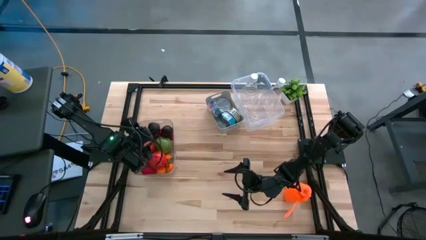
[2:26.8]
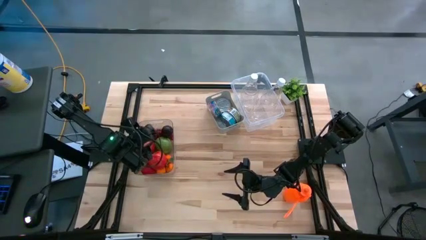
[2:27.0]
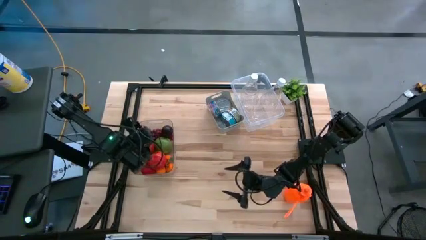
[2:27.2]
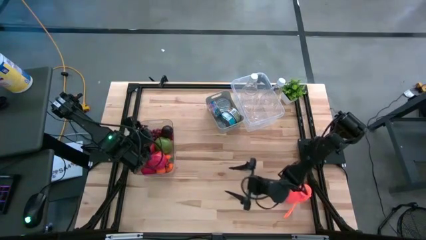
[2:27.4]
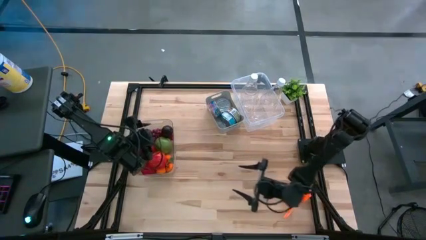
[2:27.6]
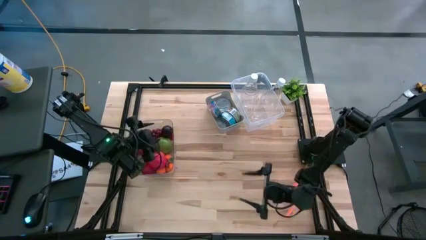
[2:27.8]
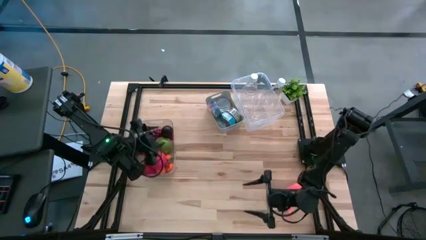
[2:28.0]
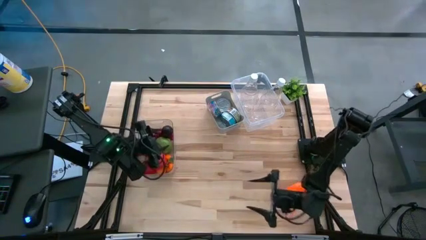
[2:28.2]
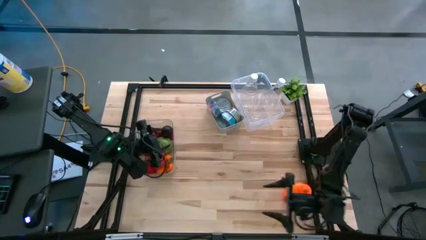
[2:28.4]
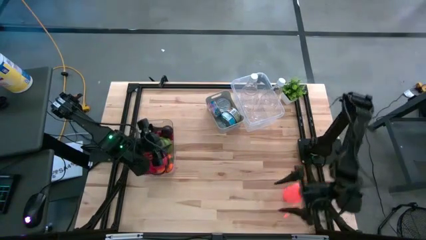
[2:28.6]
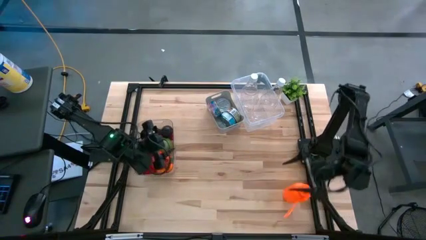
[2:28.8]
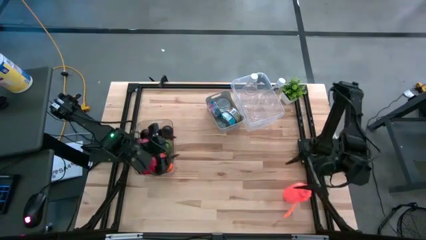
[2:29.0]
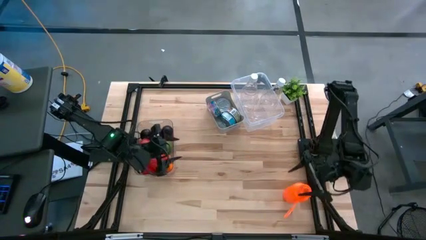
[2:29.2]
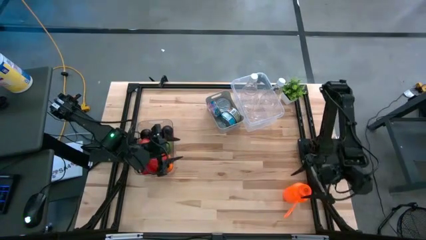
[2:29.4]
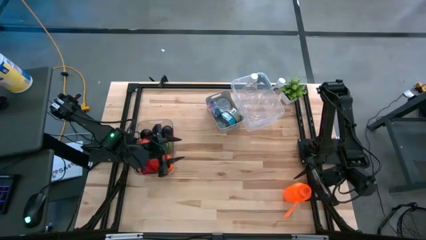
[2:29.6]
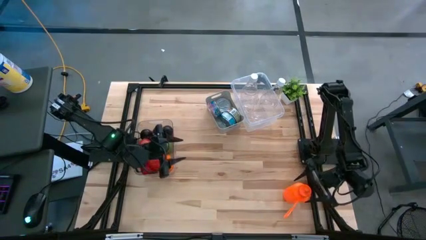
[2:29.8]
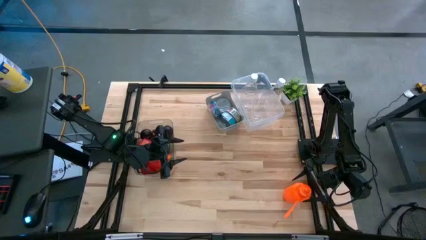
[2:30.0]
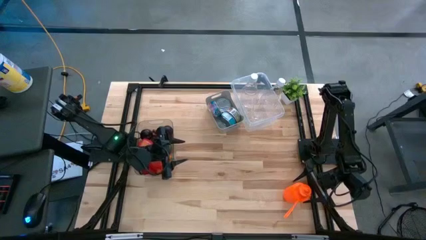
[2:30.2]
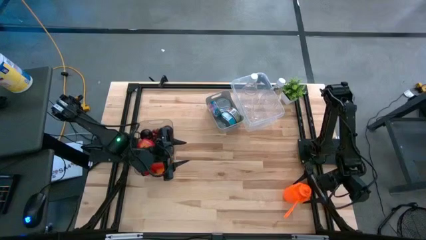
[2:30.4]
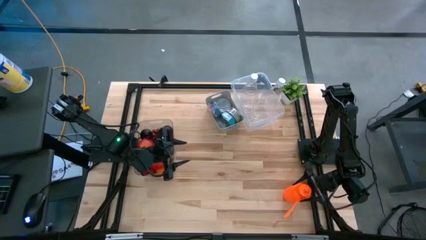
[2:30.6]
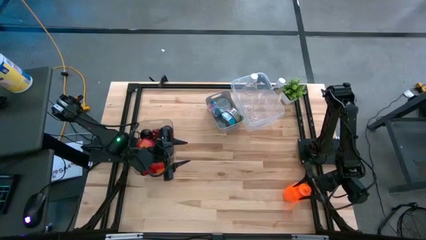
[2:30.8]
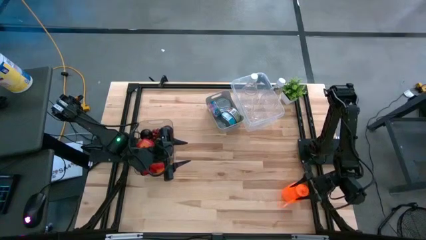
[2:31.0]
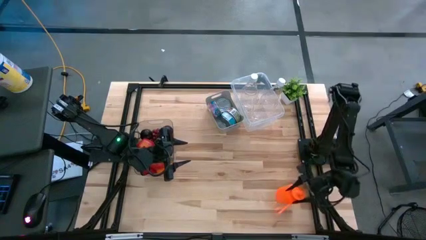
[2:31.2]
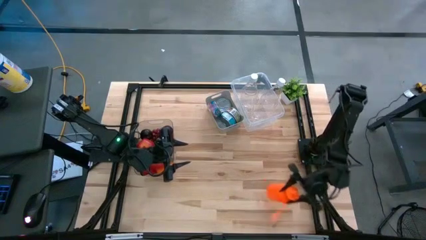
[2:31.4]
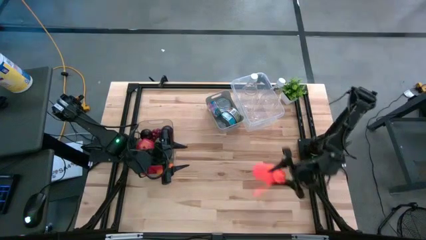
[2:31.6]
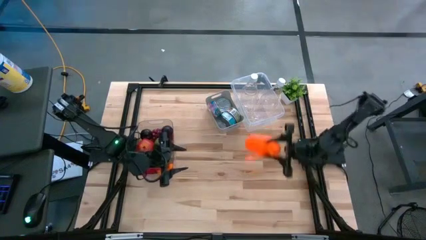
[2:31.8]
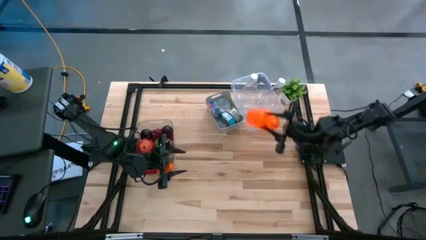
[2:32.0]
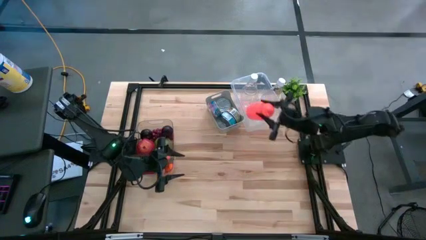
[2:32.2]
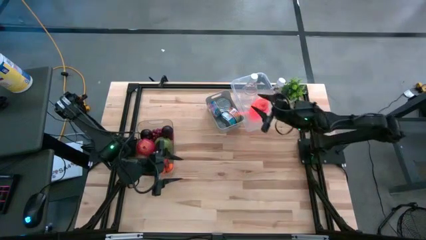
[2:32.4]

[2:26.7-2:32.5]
Task: Pick & Place Food Item
Put the orange tumbler into the right transparent bin

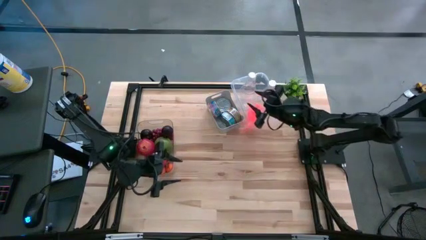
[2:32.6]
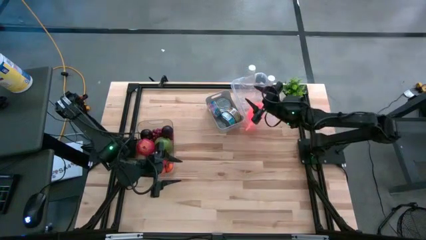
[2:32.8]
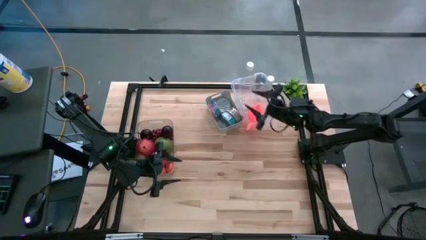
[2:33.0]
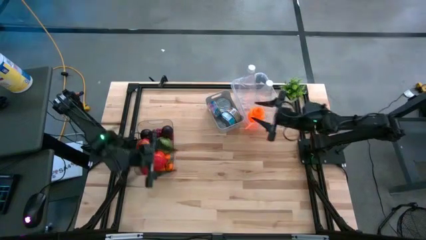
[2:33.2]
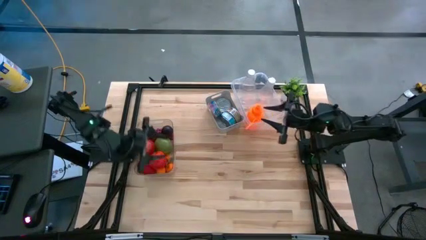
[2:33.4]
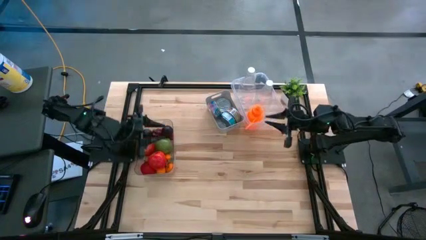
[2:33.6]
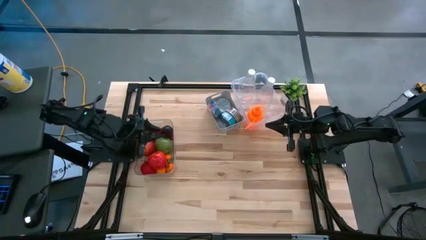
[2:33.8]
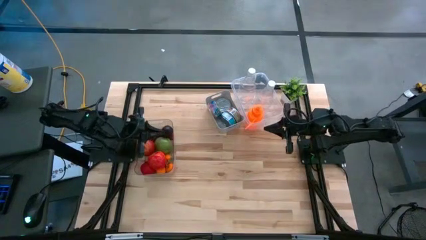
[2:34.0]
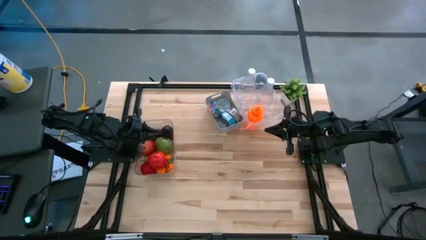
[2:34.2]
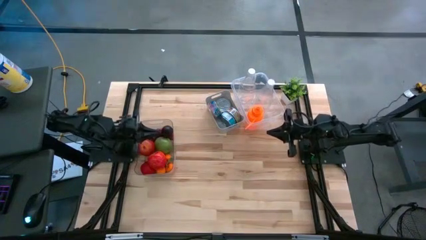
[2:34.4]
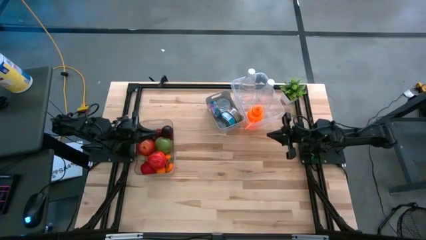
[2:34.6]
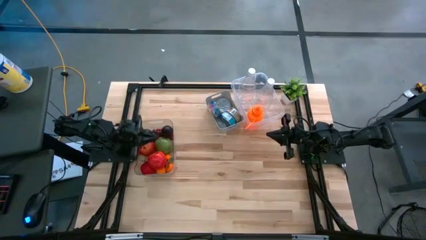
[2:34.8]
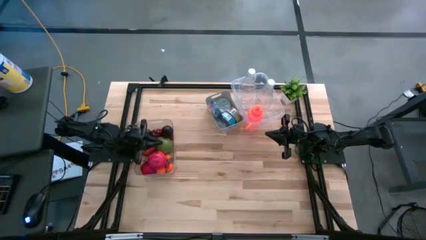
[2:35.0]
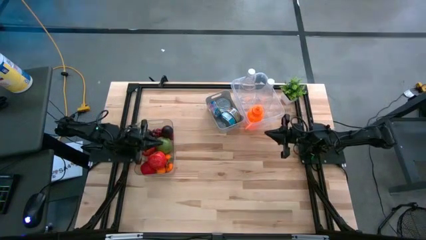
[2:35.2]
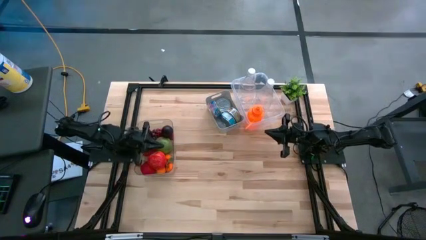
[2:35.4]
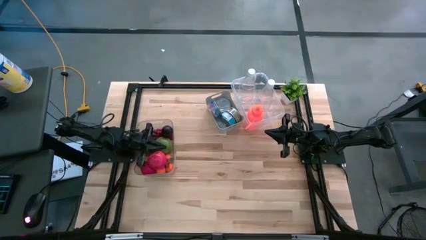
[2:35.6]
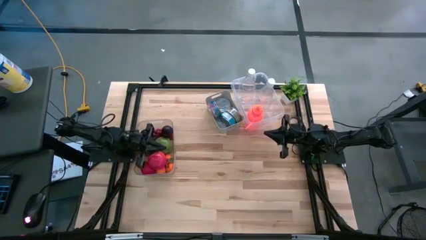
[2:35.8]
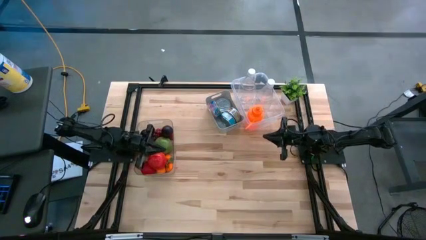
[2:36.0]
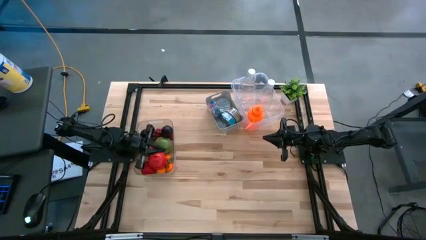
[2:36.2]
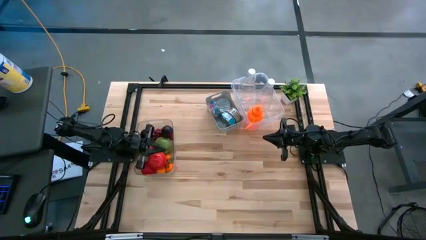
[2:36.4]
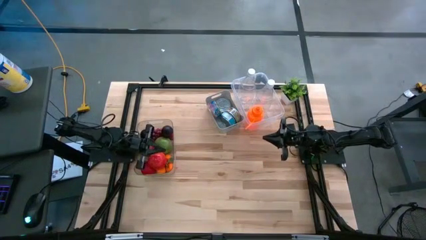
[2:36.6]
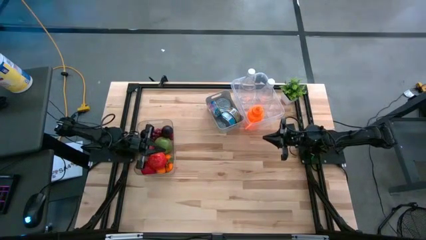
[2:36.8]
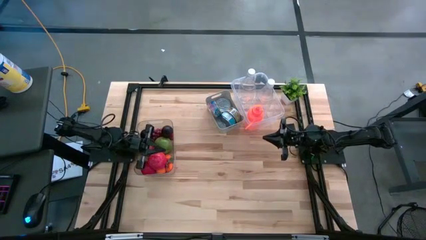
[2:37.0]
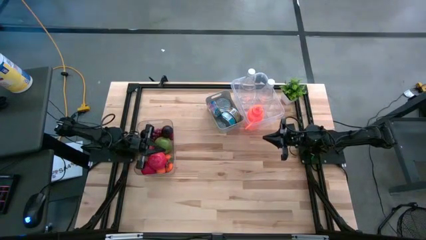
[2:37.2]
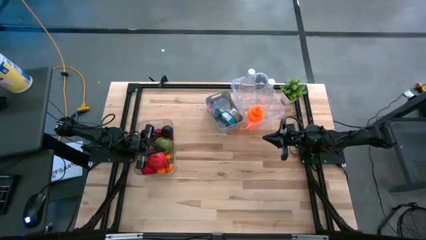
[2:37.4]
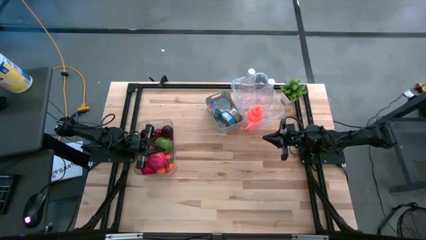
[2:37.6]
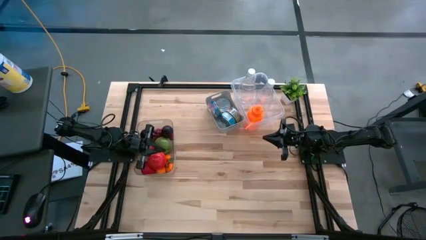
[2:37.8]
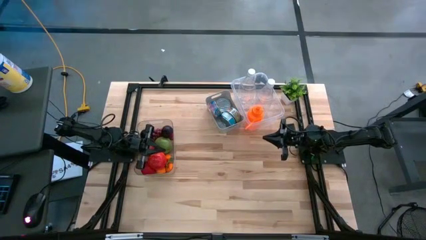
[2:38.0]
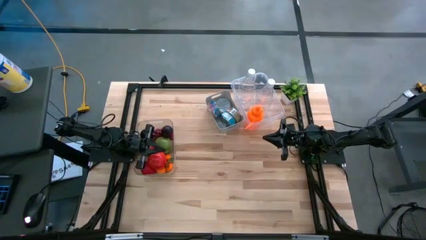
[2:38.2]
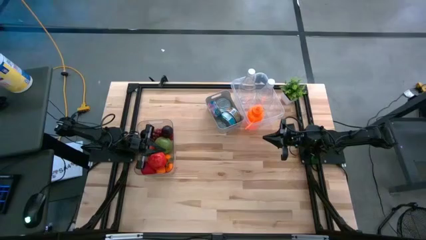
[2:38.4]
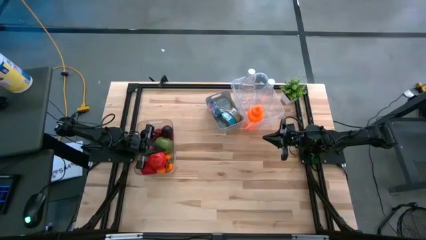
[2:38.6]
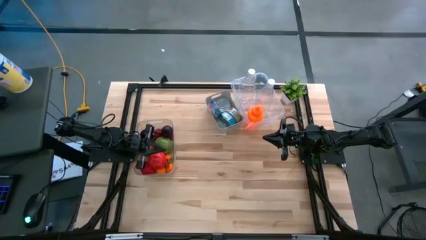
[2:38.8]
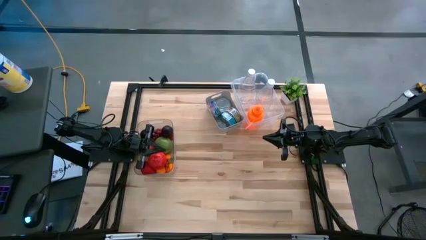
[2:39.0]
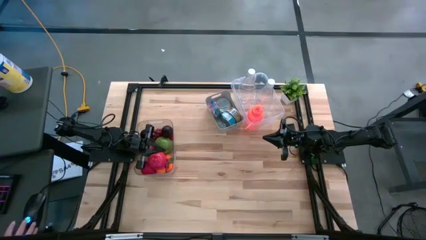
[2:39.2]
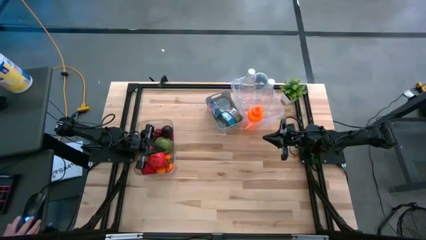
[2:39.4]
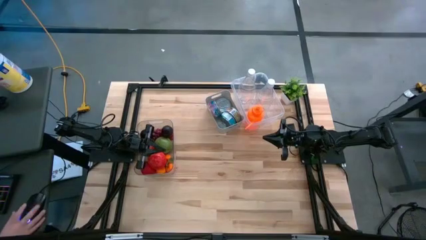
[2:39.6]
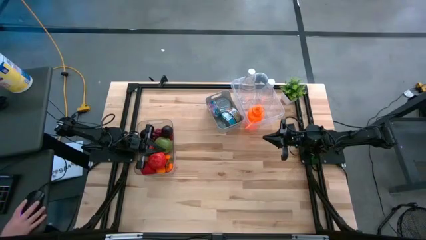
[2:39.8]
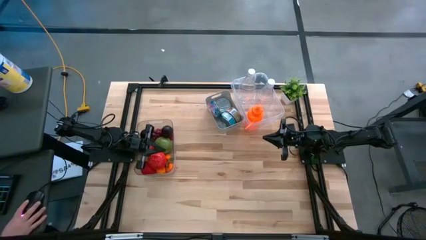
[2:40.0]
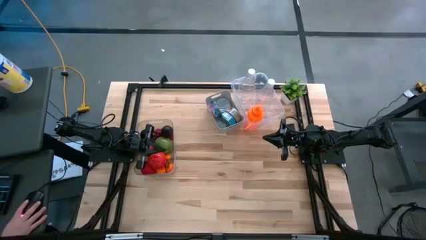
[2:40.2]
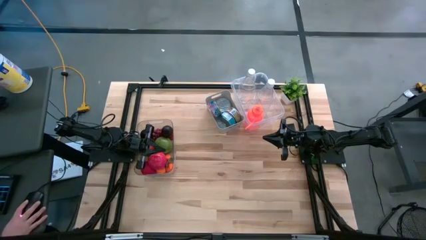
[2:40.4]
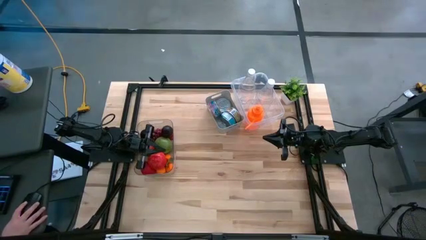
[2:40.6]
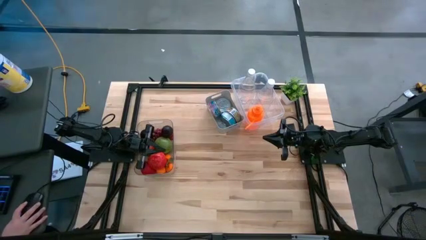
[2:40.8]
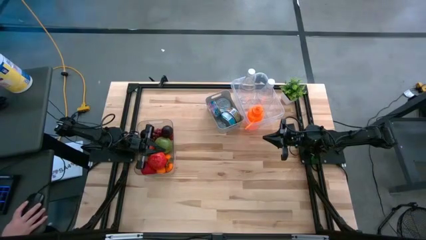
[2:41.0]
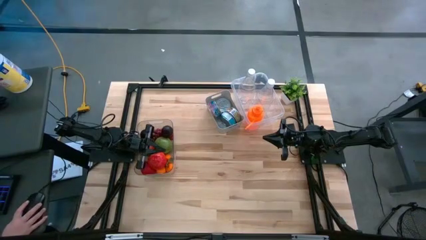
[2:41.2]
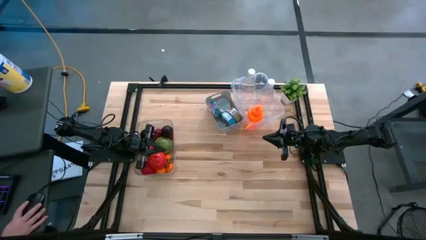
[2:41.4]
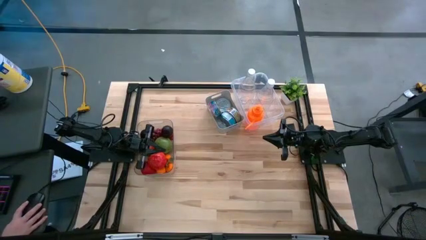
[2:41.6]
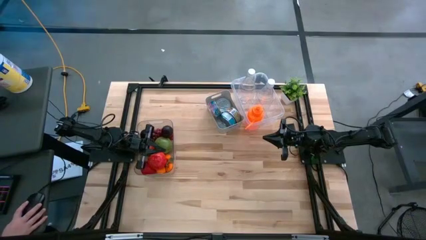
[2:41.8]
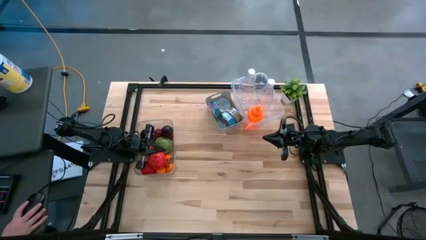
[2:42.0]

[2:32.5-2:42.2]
Return to Home Position

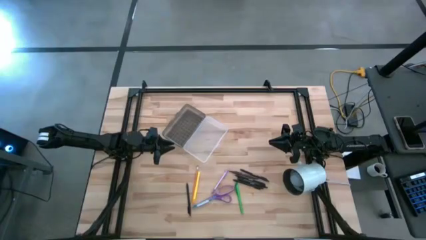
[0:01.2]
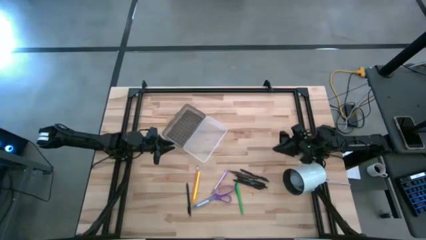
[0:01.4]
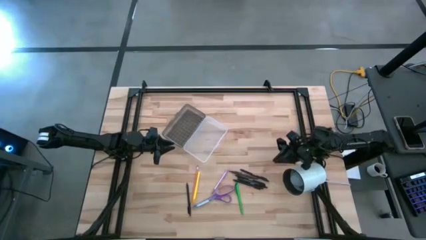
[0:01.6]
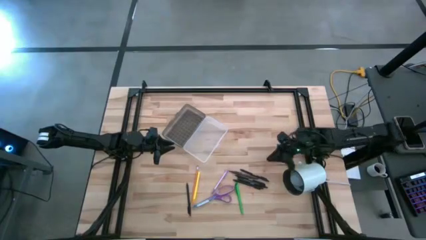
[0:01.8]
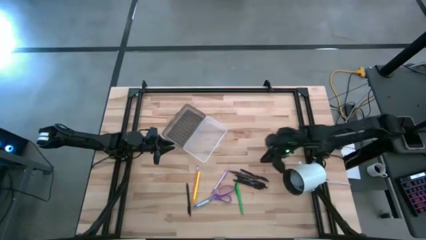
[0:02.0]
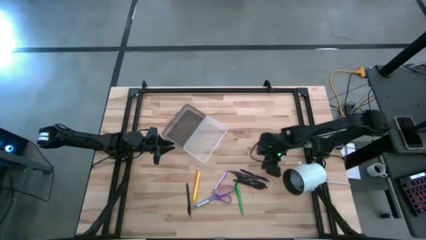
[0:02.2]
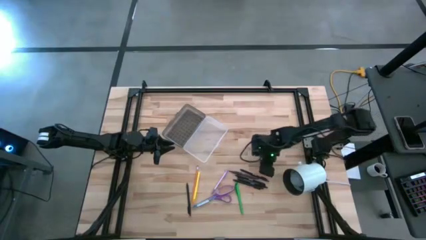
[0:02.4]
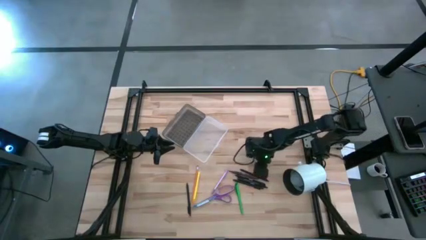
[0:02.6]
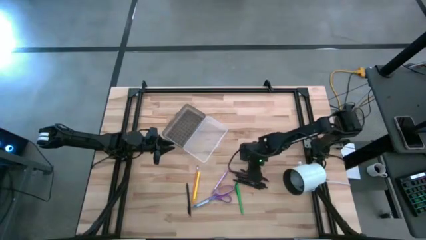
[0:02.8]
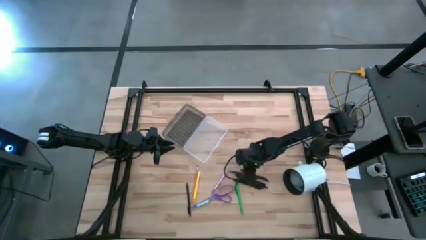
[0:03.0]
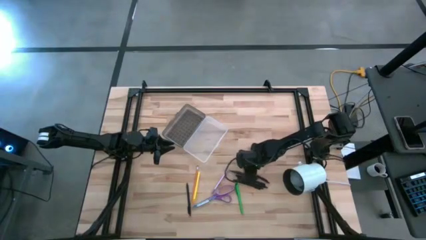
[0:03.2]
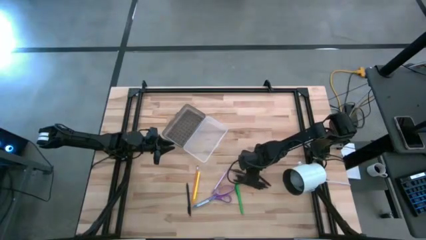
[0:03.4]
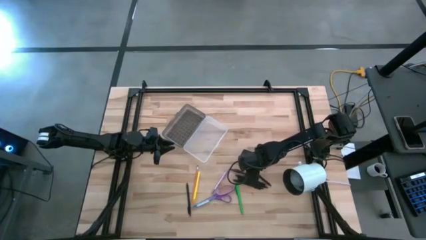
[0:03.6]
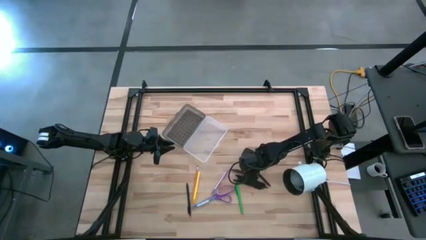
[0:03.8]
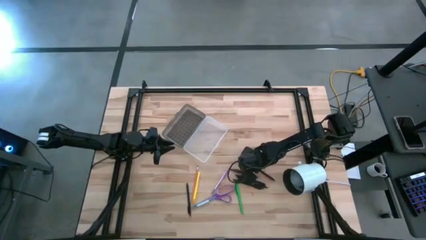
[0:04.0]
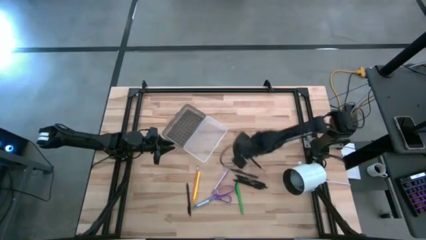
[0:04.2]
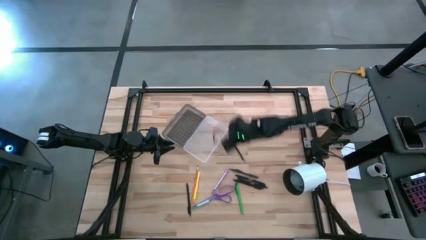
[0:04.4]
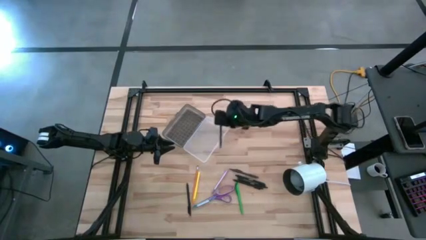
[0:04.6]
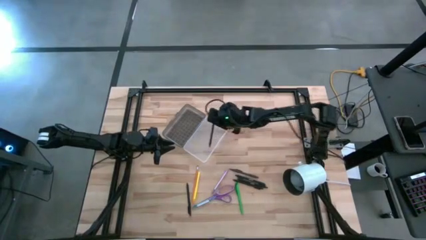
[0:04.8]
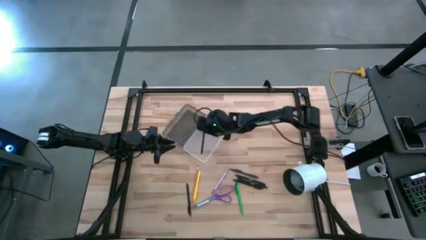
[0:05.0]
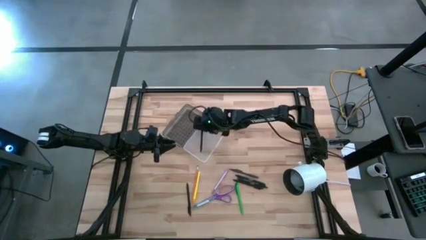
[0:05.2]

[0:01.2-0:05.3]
Task: Pick & place school supplies into a supply box
Put the black pen into the black supply box
